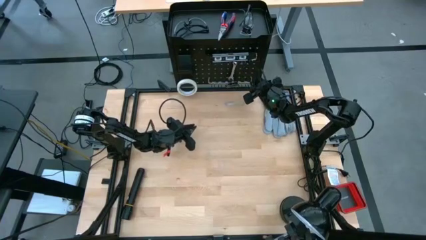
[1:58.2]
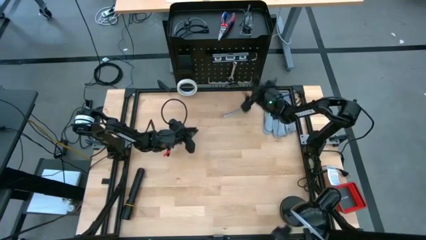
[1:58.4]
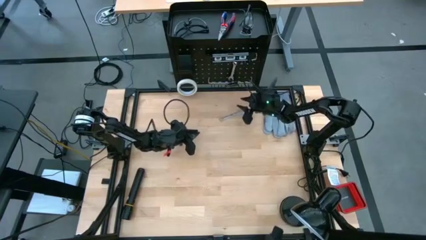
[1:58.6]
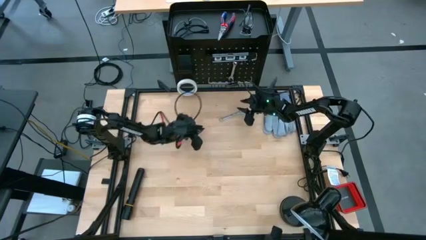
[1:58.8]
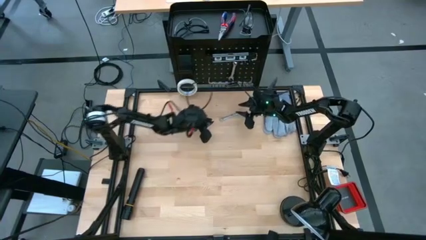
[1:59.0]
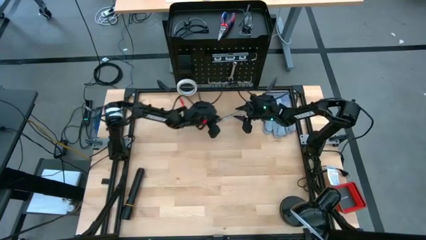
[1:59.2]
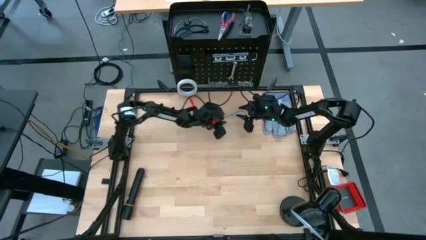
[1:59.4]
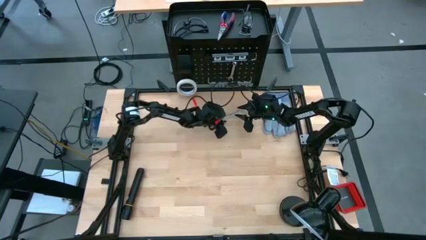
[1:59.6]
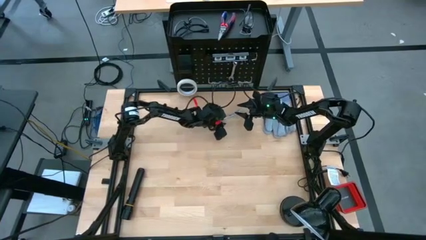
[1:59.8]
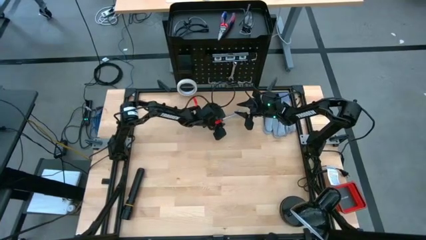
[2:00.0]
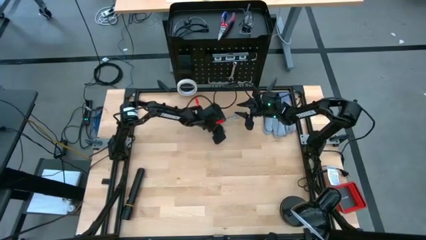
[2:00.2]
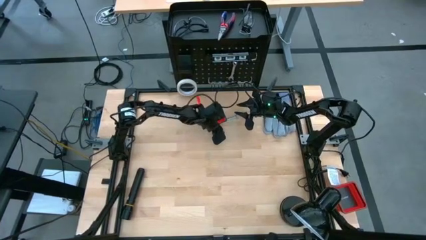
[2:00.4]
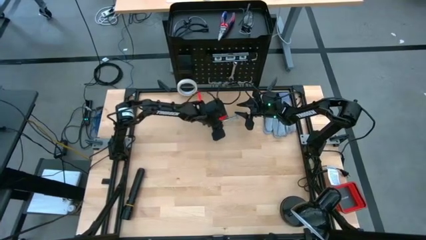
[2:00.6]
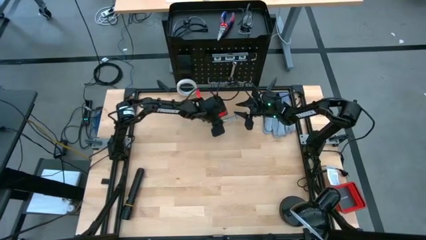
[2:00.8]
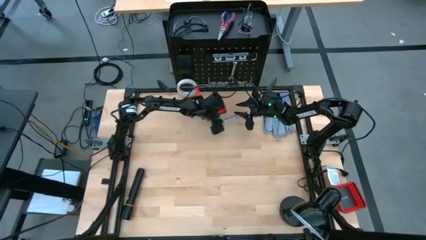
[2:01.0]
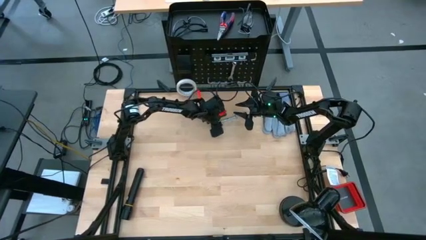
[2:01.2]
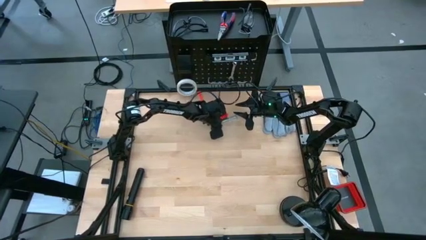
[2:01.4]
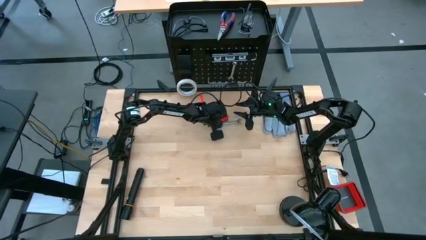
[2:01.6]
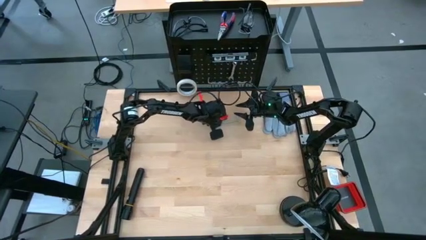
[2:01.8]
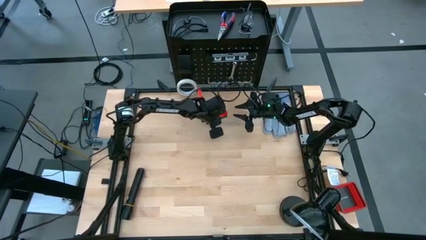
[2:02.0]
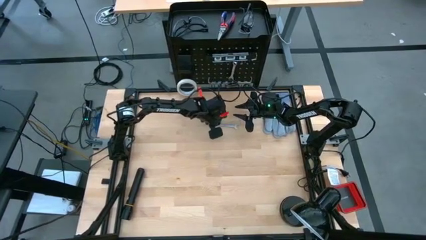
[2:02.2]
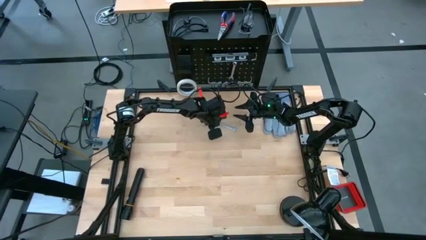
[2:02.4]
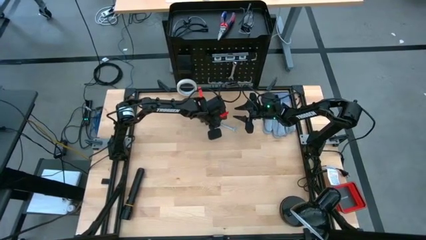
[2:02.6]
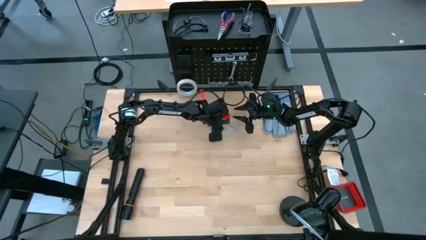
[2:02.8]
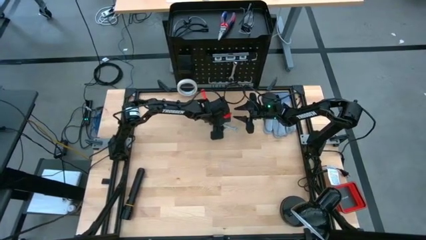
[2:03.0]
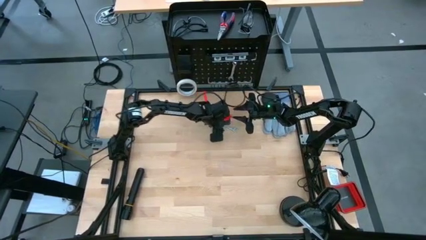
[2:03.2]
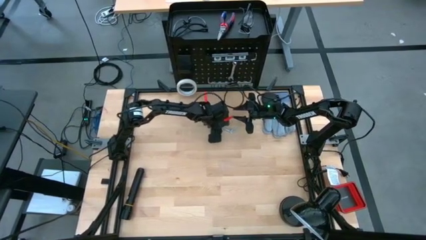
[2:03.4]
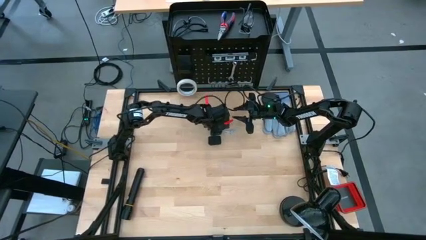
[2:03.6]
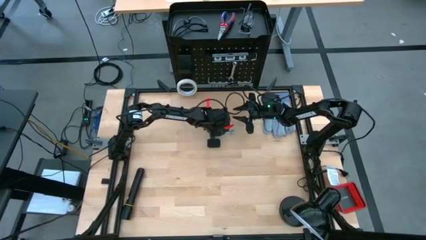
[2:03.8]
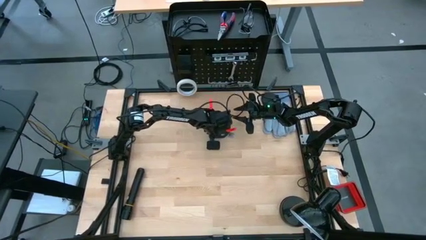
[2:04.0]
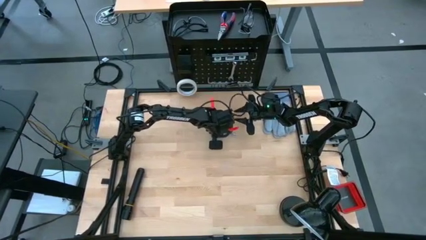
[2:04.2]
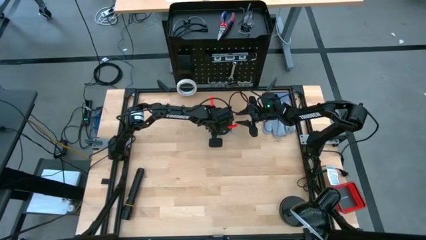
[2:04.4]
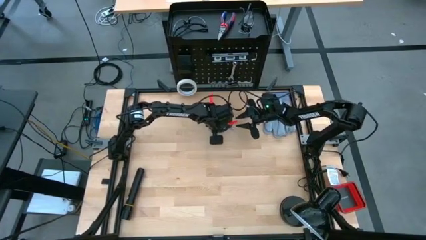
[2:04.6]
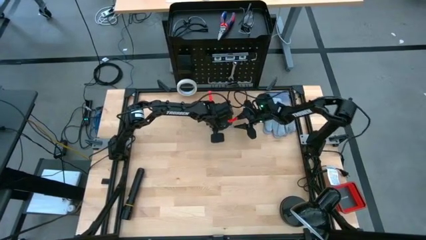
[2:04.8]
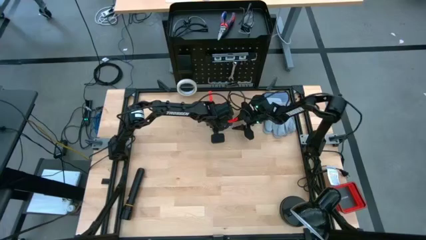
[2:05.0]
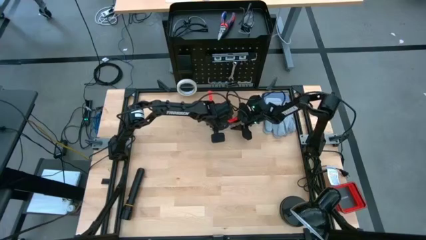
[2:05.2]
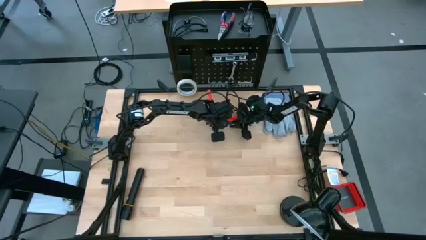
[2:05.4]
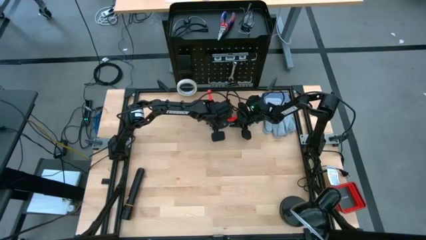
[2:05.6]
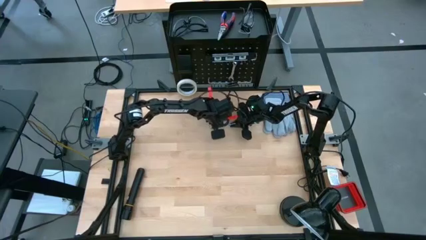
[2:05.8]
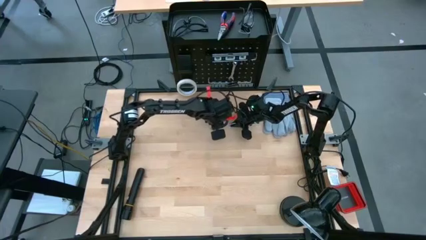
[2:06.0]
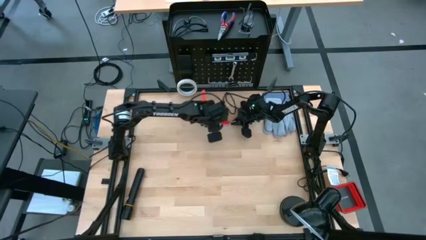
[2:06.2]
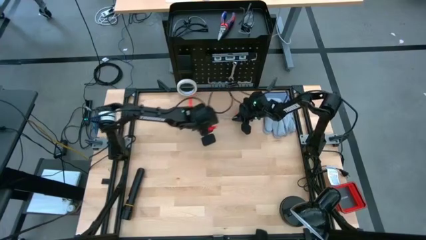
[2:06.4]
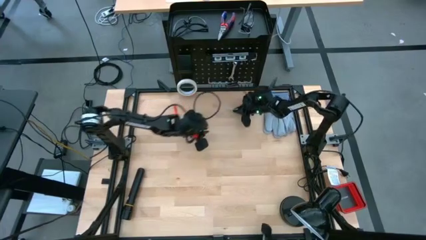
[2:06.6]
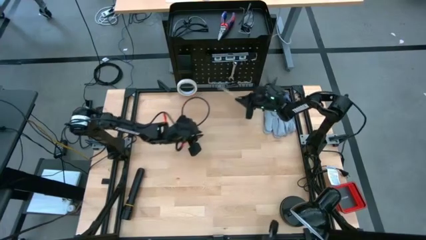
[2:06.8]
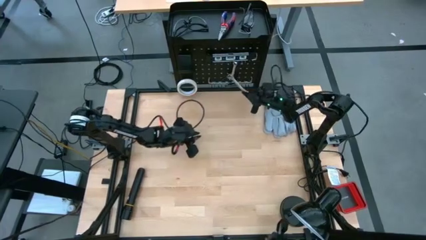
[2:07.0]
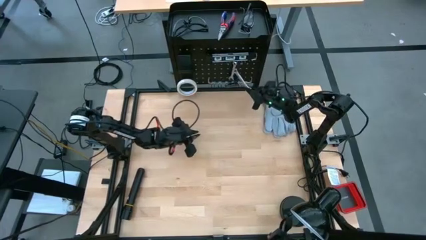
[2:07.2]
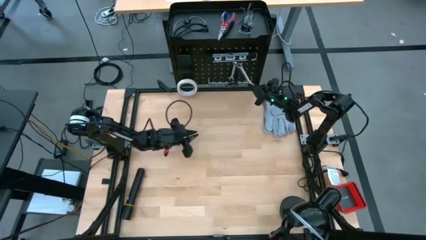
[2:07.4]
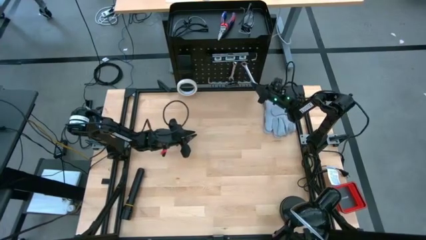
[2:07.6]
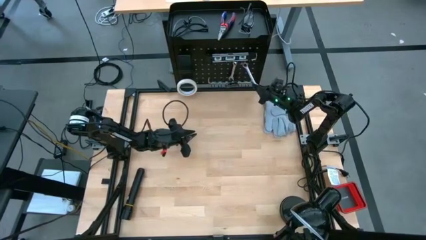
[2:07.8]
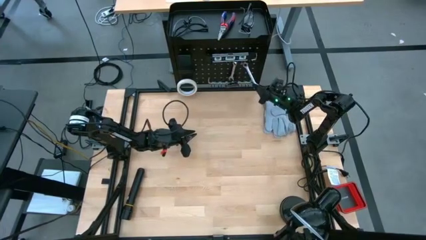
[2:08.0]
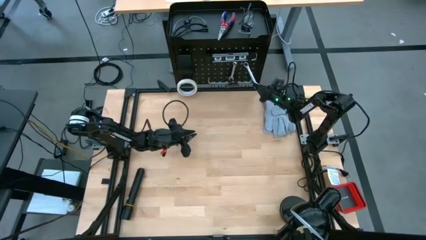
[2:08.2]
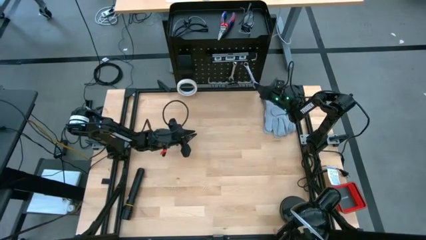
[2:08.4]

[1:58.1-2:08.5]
Task: Hang tools onto peg board
Hang the silver wrench on the black pegboard

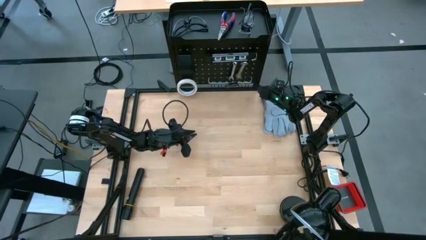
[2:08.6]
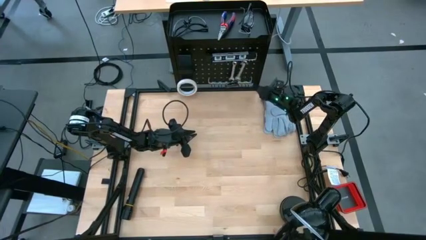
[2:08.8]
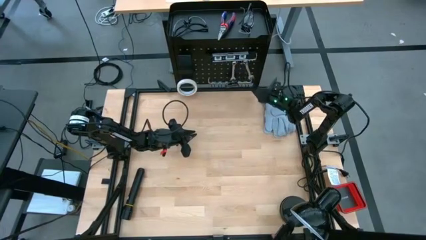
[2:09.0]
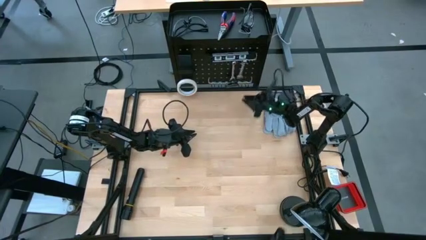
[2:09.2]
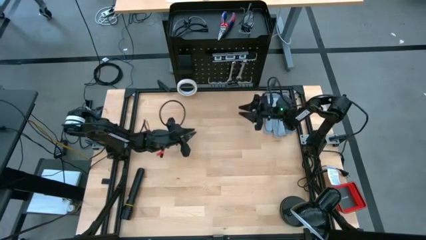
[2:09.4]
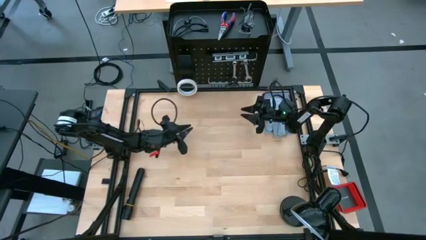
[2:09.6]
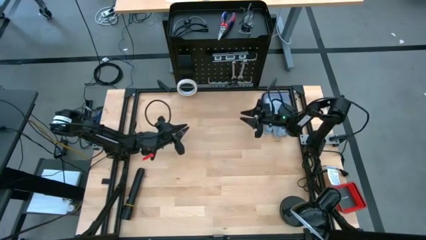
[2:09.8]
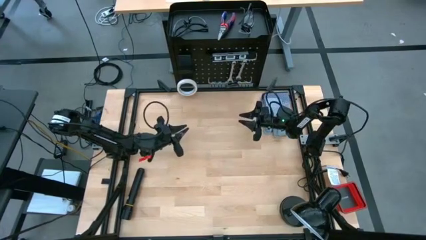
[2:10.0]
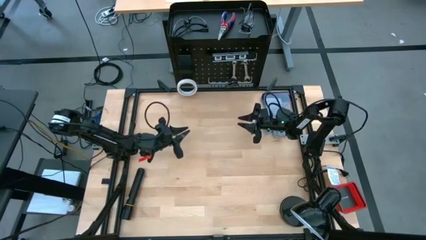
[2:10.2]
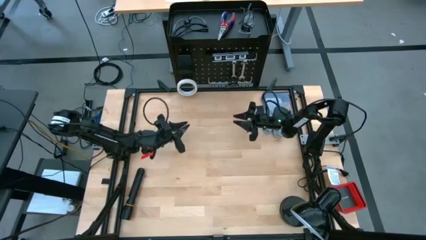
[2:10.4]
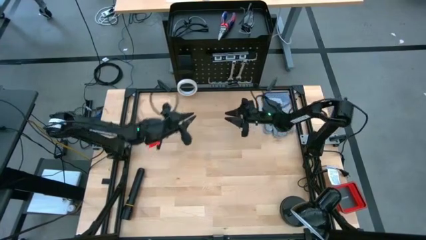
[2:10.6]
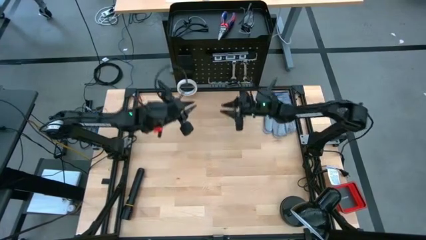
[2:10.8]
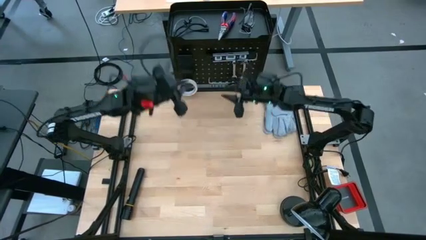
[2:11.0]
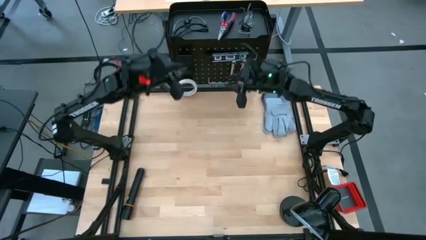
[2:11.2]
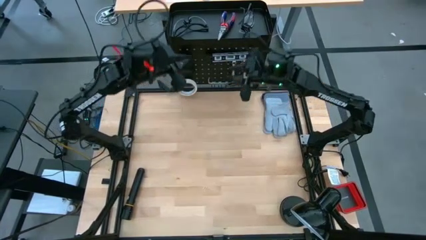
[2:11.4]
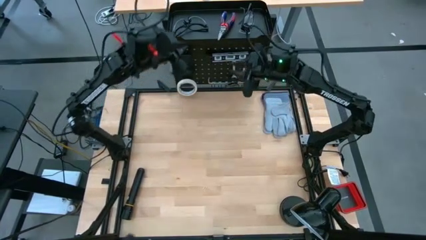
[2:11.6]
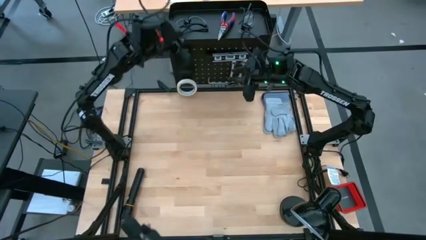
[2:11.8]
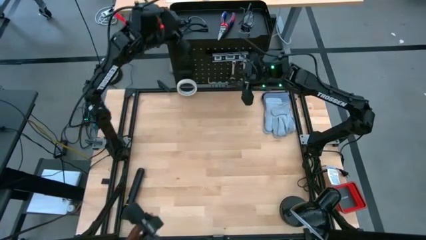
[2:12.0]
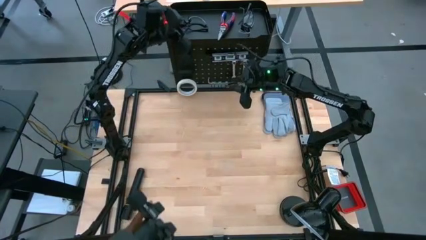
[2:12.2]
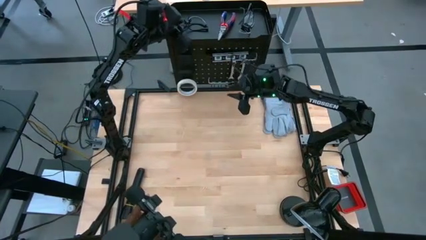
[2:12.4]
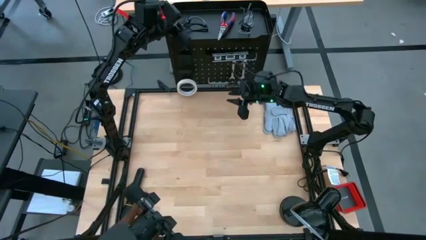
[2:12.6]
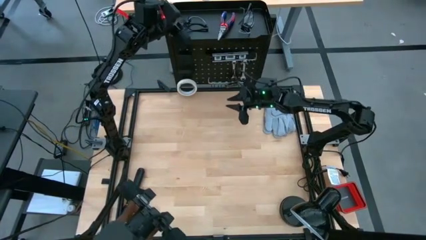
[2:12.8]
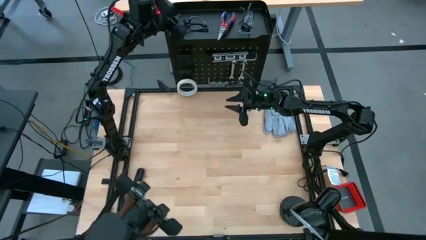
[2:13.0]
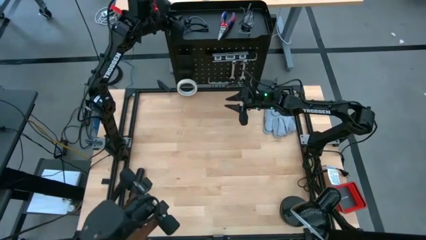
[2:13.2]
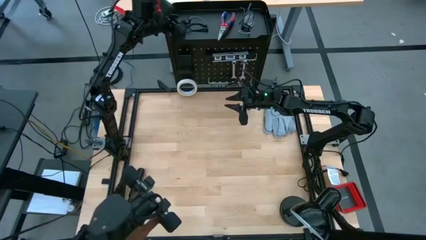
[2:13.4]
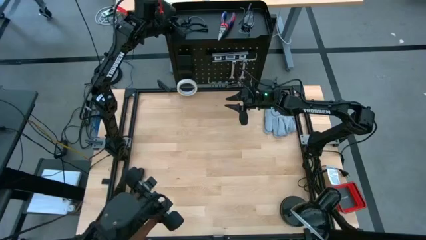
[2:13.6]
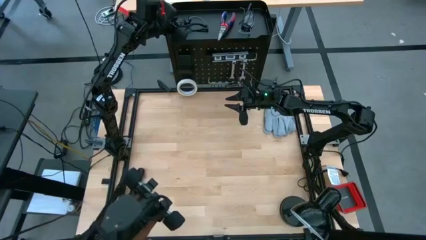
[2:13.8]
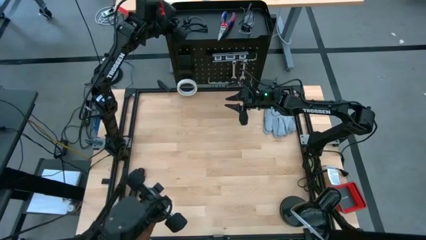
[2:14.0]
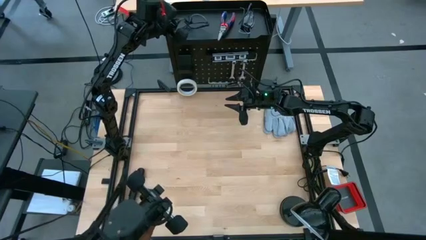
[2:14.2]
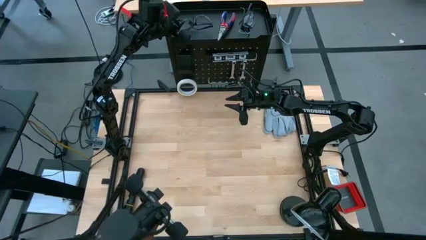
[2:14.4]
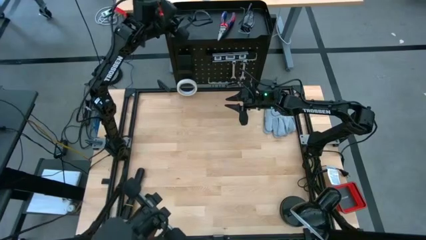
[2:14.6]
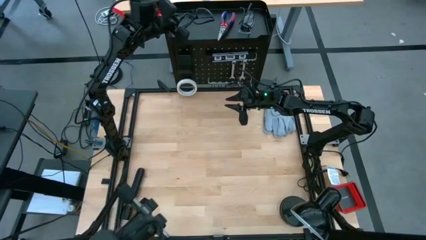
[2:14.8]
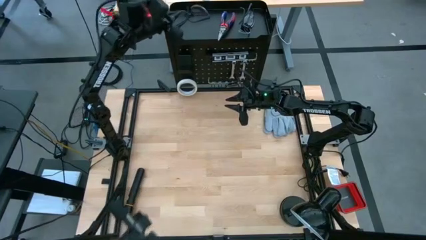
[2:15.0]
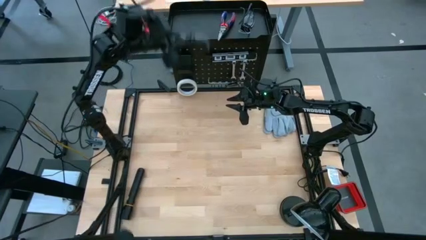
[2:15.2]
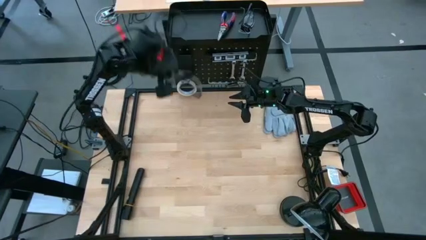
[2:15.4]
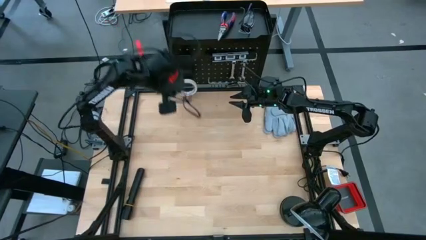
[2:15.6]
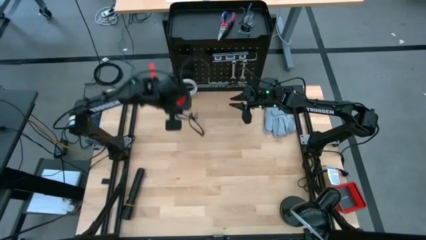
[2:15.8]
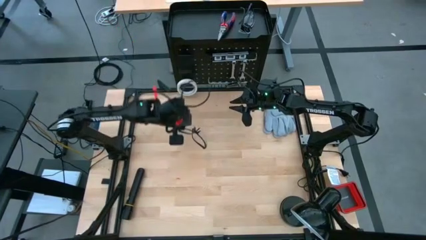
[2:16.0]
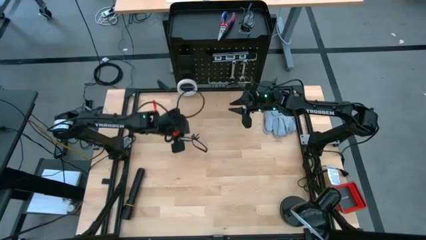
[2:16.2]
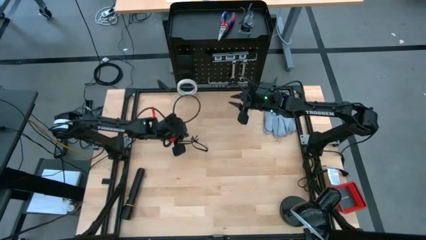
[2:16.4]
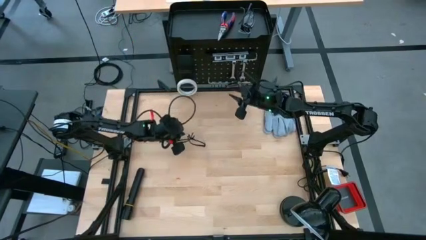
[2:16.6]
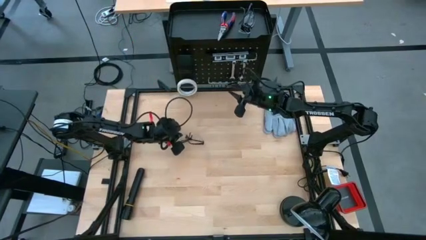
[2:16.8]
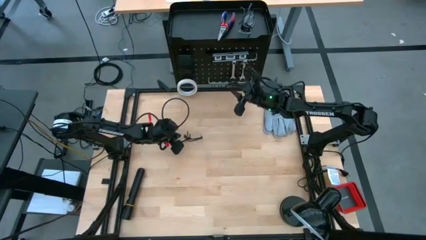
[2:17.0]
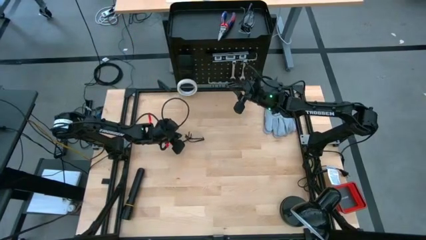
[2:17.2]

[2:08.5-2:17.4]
Remove the black safety glasses from the black pegboard
